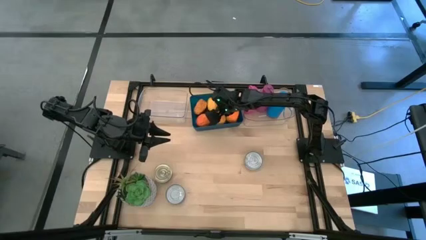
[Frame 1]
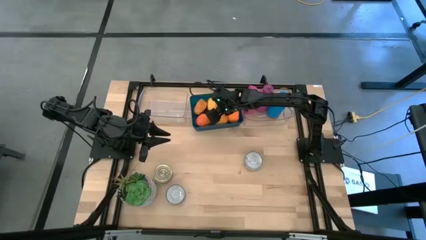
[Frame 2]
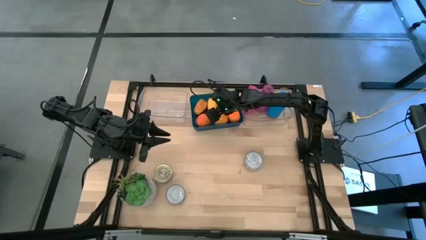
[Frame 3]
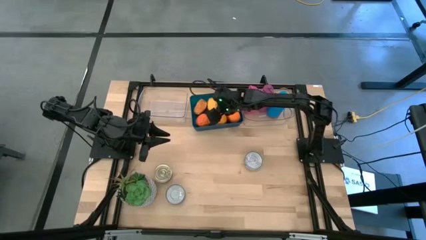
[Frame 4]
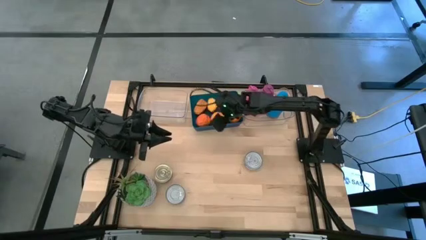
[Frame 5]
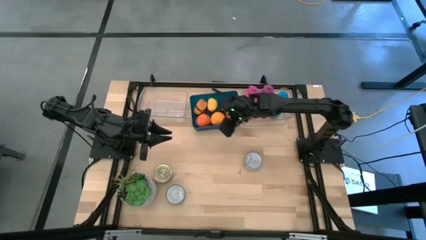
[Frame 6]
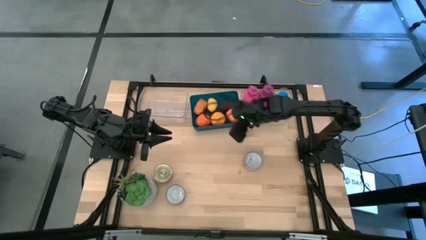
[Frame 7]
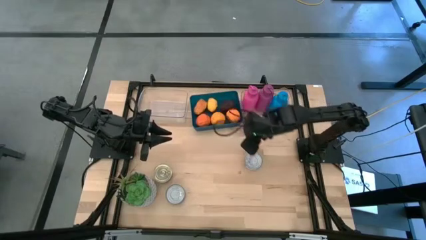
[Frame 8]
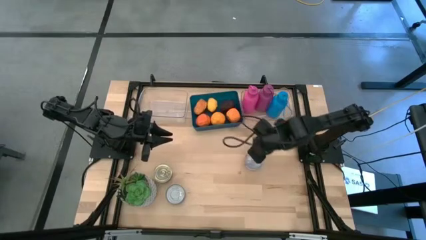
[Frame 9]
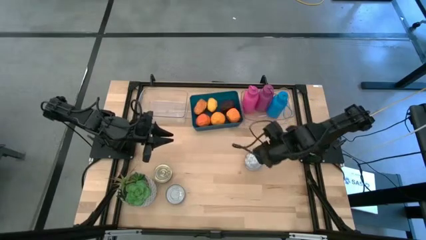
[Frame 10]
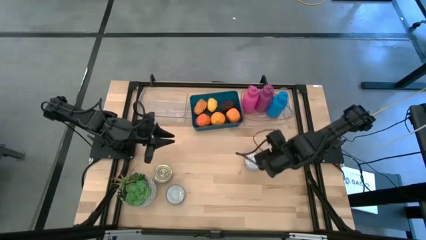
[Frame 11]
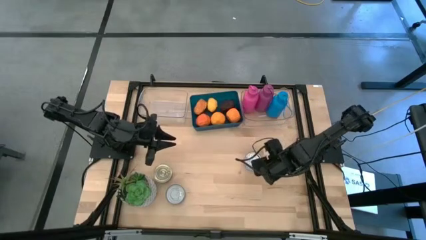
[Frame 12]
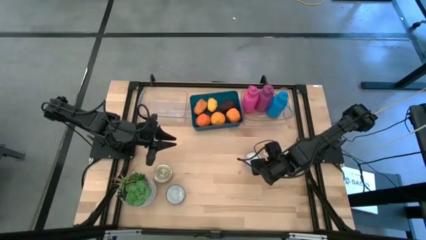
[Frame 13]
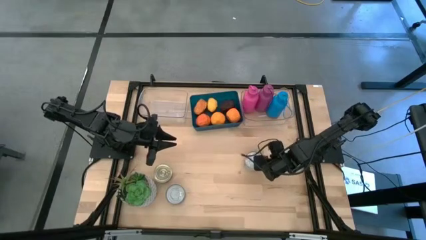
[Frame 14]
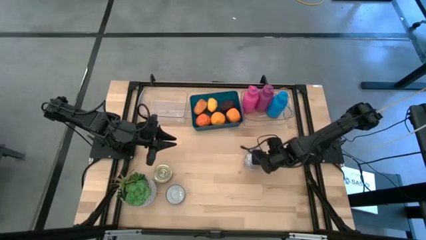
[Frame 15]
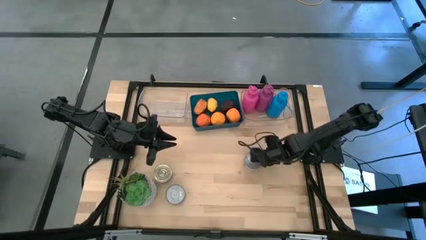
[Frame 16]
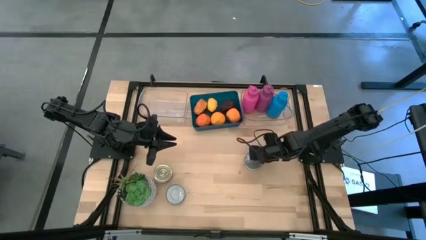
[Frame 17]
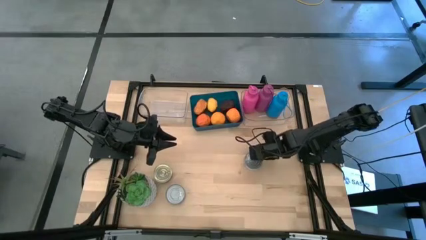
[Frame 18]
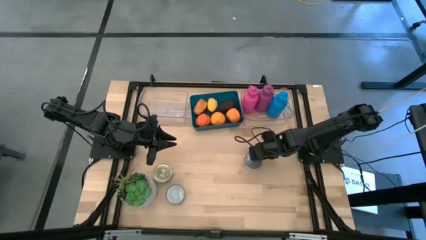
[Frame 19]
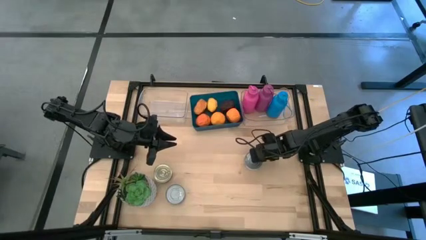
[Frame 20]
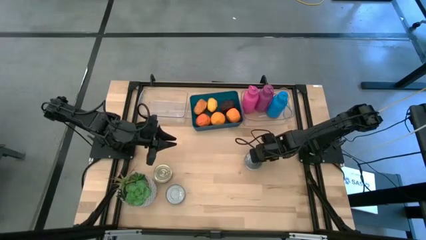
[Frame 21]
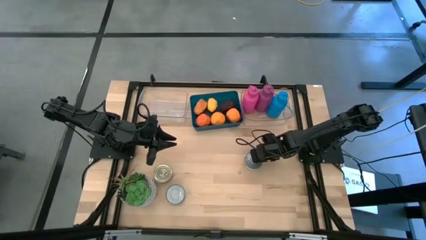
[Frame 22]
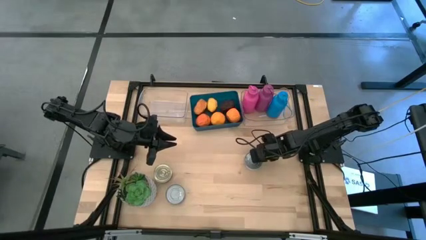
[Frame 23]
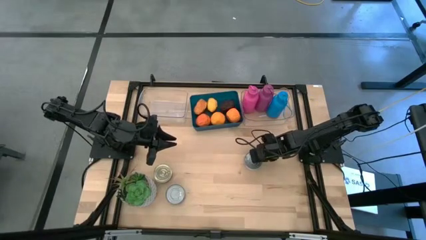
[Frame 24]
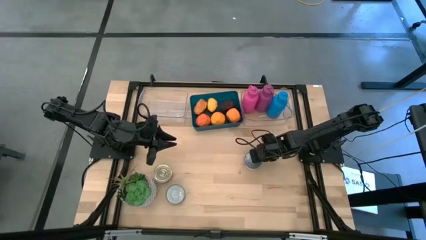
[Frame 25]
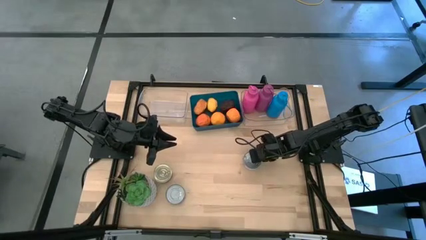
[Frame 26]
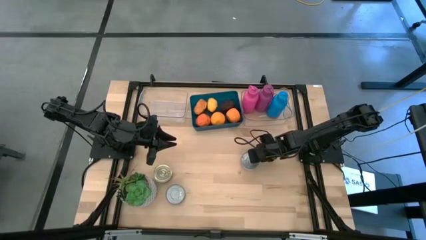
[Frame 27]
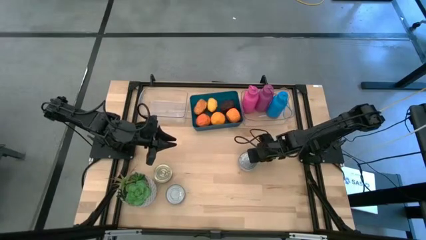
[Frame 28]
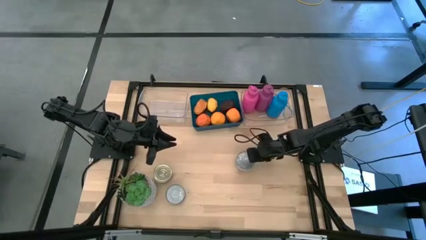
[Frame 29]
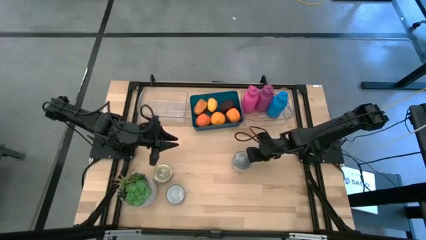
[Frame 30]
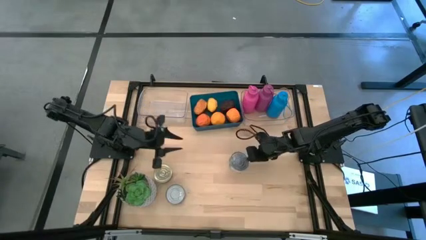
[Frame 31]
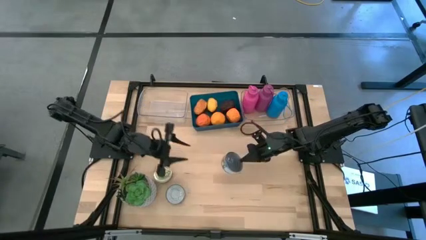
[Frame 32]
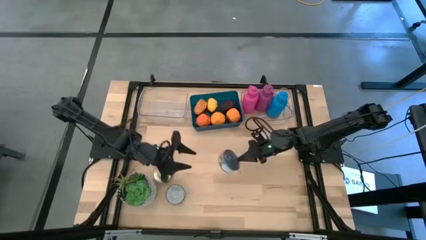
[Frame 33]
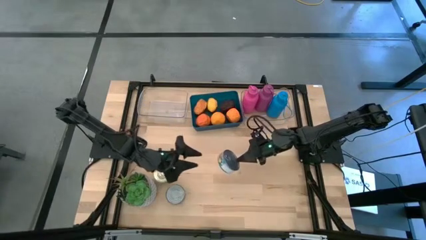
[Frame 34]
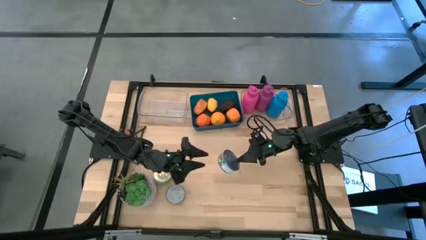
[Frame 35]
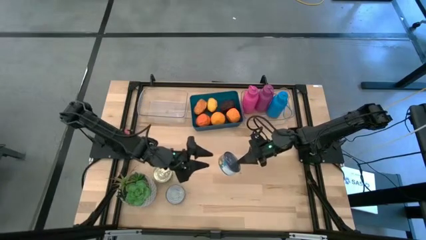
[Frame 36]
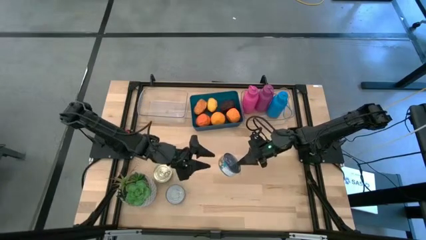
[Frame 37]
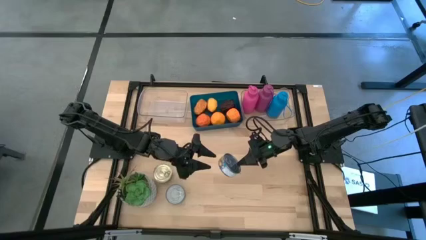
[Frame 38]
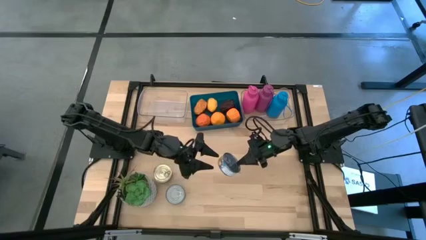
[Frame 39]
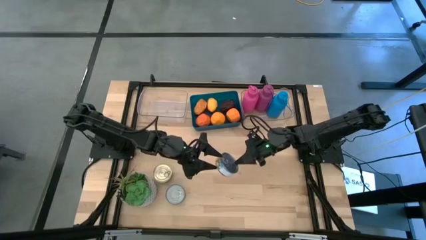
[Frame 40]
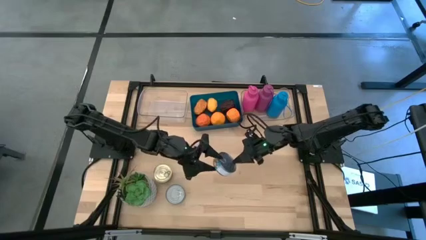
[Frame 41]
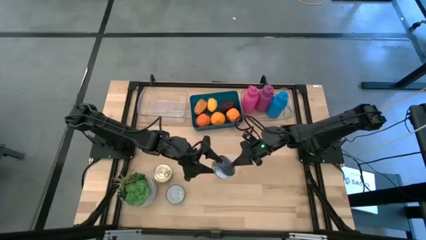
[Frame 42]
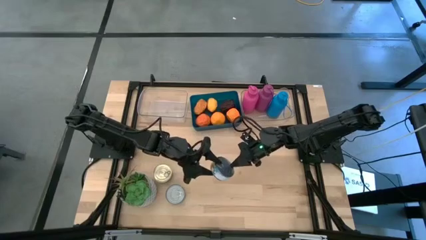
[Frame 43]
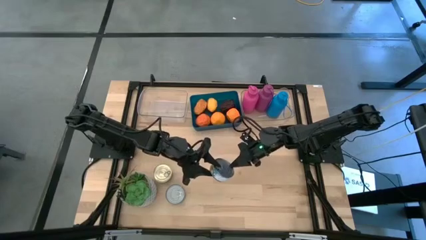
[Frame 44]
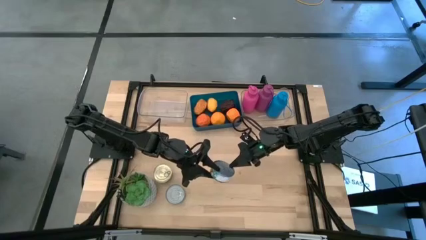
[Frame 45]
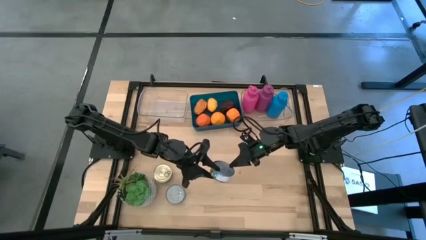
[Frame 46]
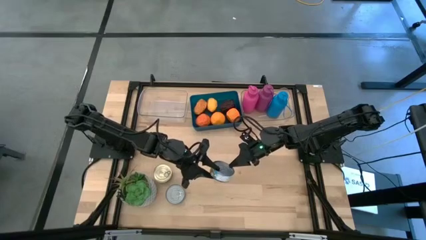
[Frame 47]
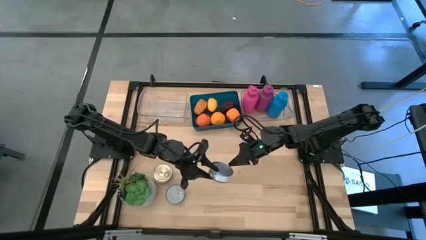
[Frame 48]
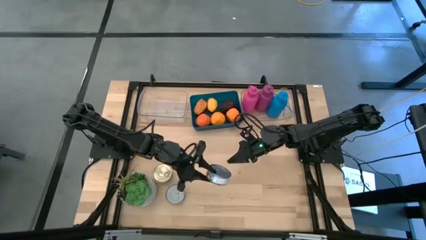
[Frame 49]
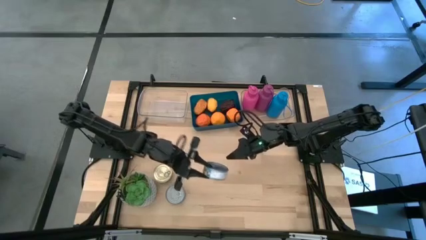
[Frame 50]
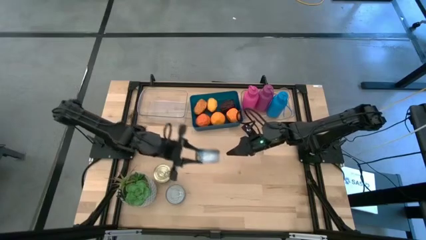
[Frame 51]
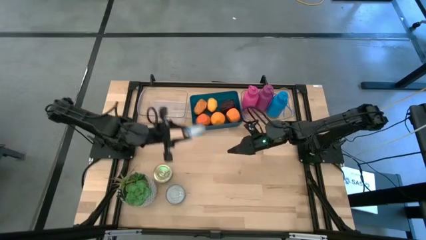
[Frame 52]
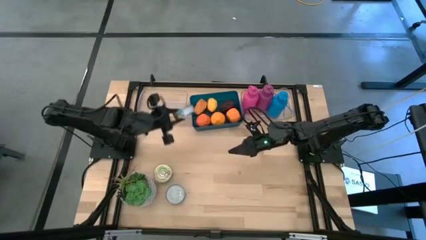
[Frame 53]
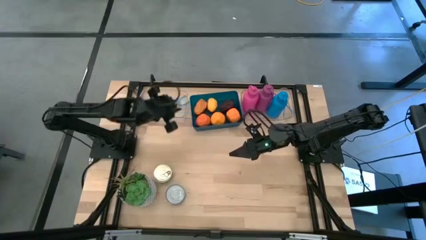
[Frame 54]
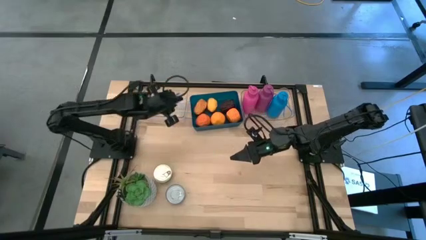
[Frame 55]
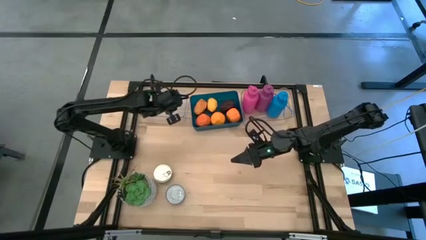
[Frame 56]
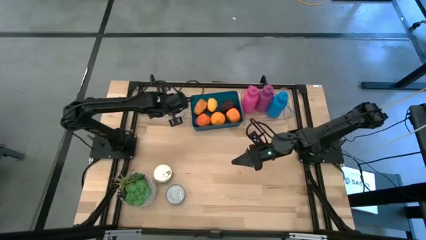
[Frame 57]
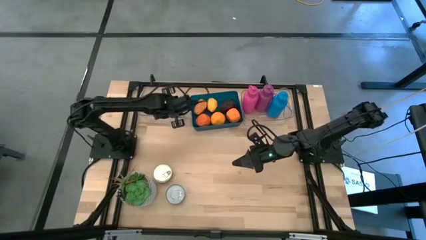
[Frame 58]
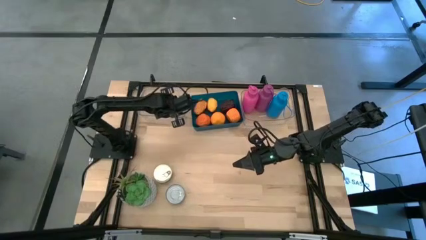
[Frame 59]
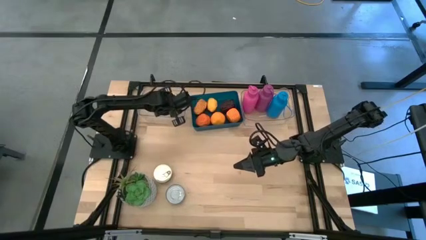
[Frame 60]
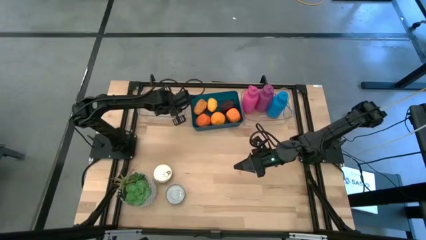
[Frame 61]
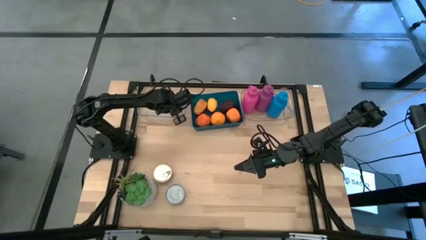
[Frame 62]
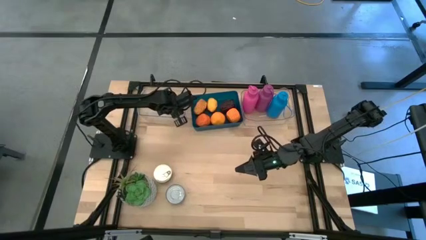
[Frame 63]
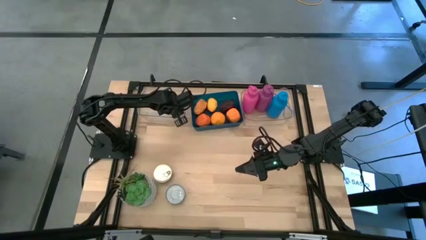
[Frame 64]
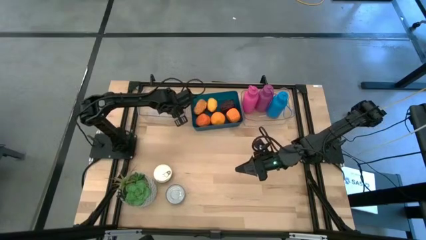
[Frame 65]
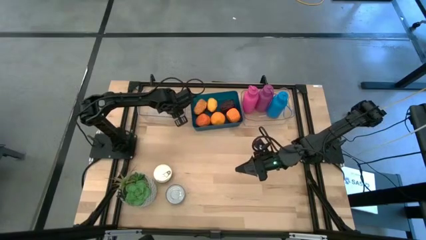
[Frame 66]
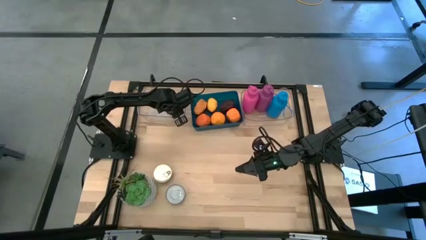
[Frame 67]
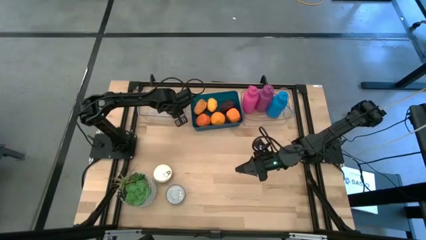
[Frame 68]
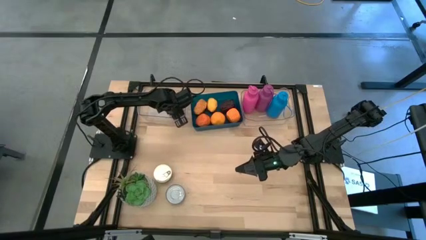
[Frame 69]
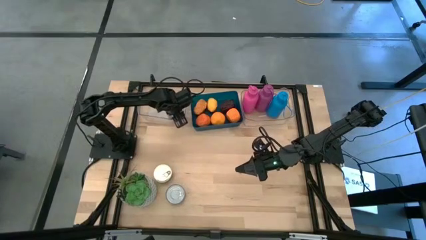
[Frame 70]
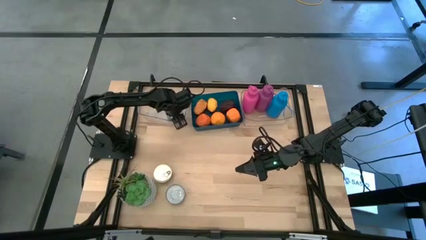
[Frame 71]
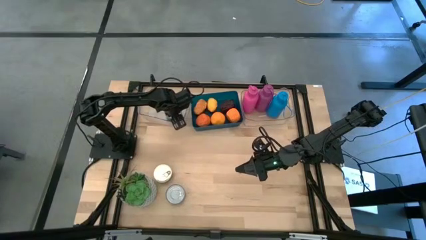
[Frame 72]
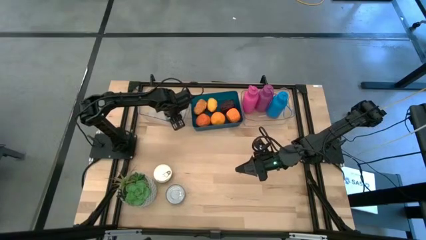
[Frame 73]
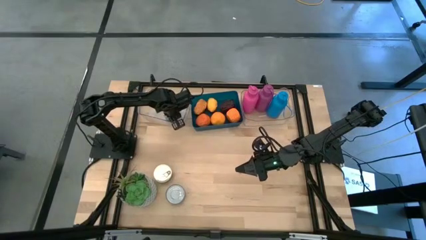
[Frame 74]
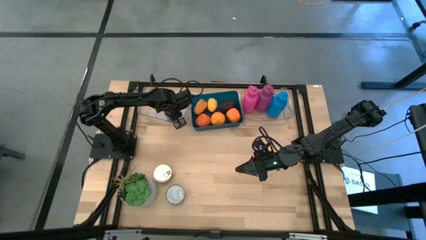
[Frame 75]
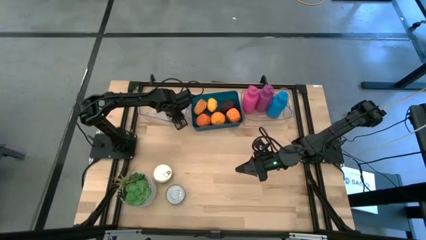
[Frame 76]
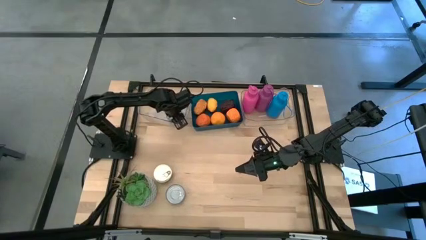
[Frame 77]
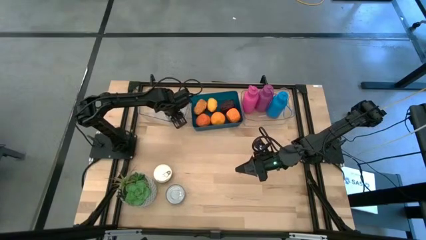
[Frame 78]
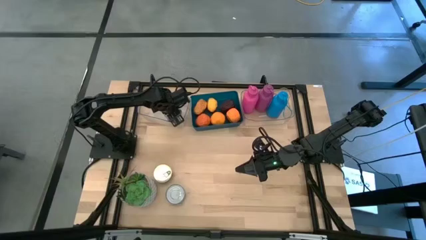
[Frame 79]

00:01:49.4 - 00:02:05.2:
Task: Pick & Place Food Item
Put the yellow blue tuna can into the left transparent bin
